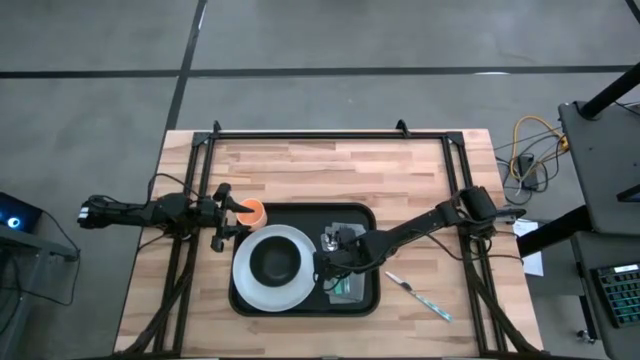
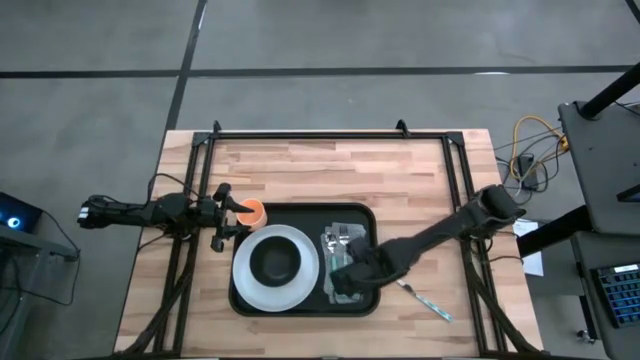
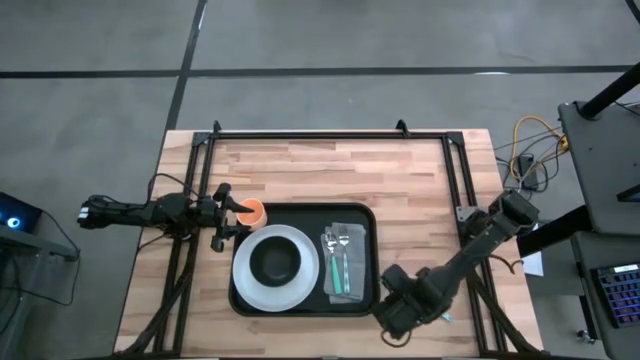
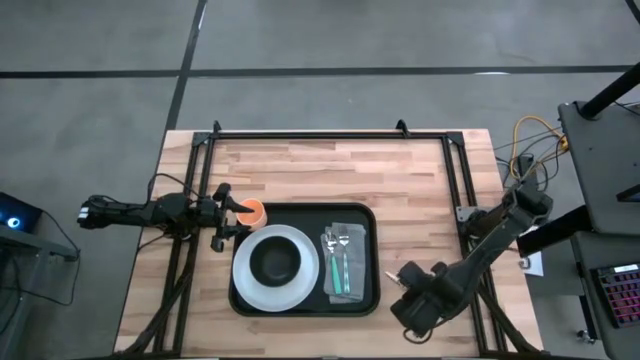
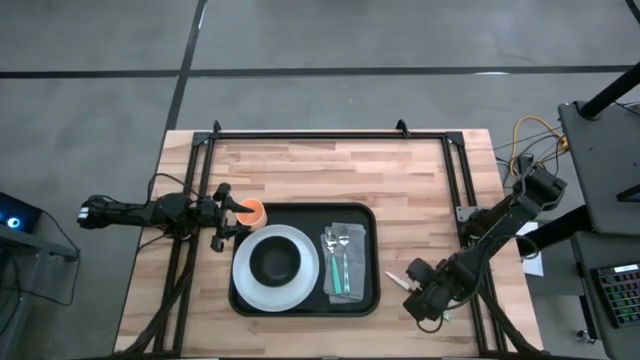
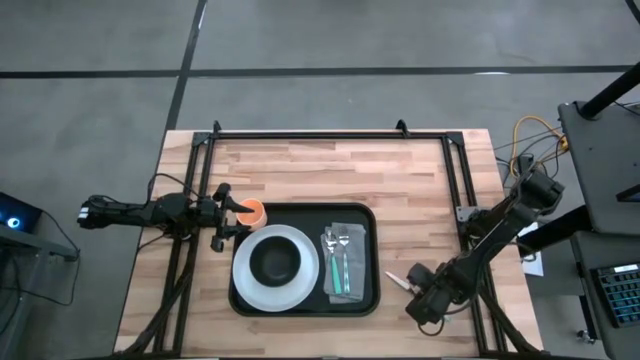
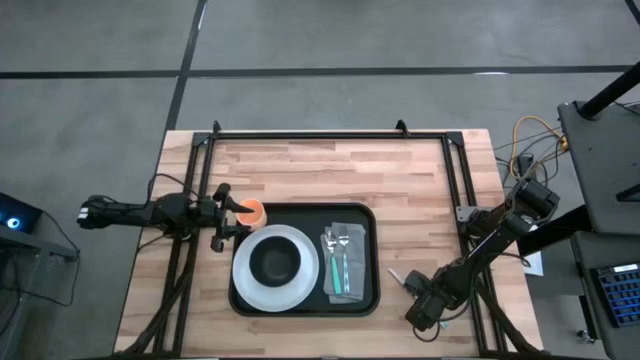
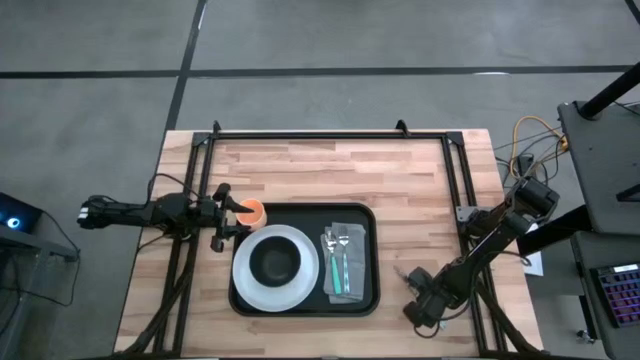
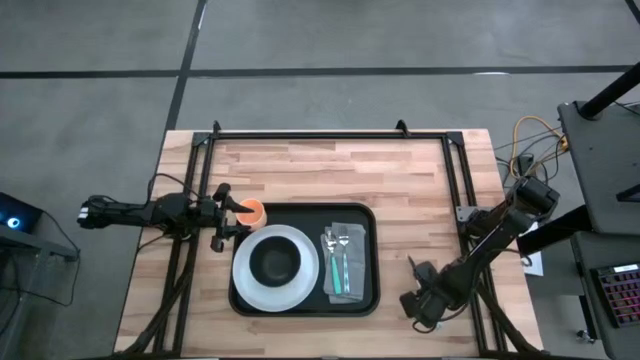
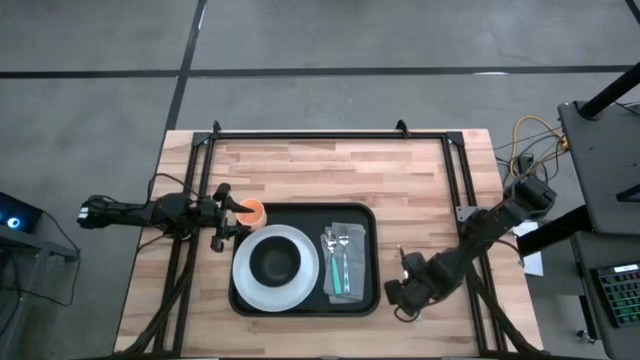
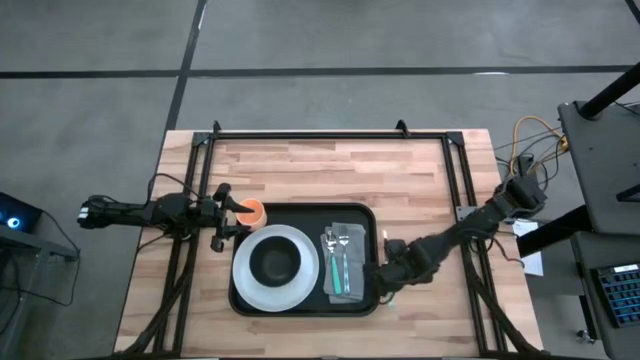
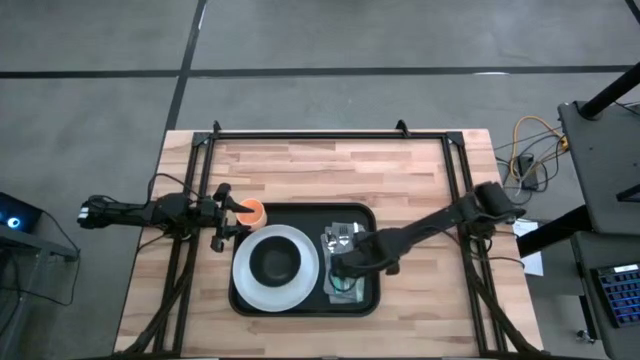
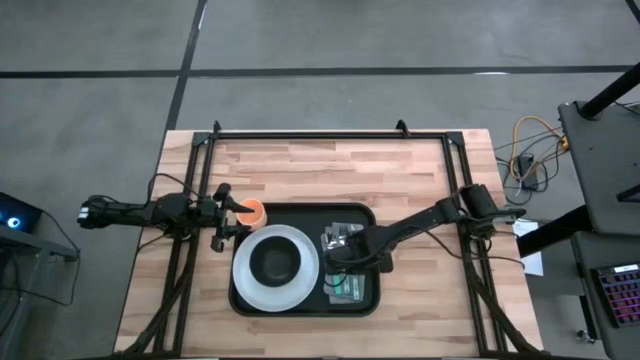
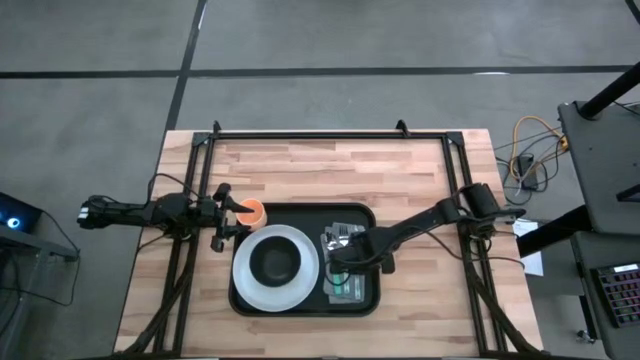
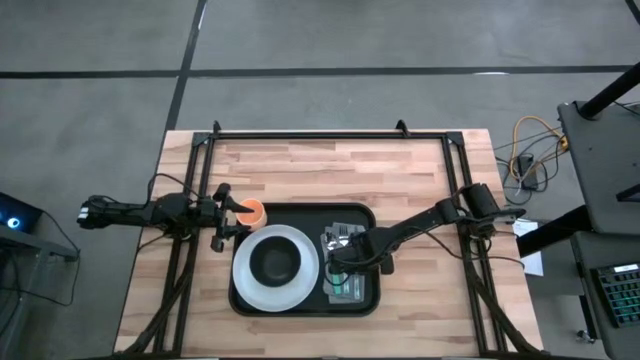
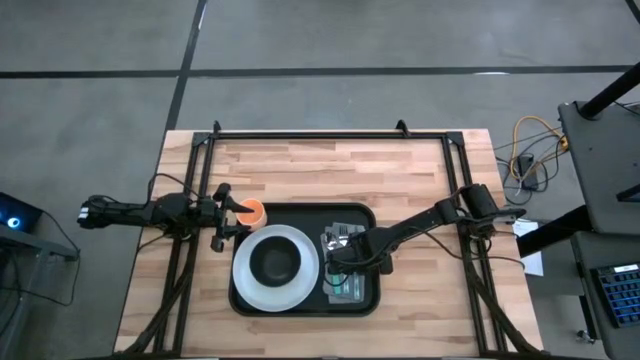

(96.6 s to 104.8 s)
Task: Set up tray
Put the table knife on the table napkin

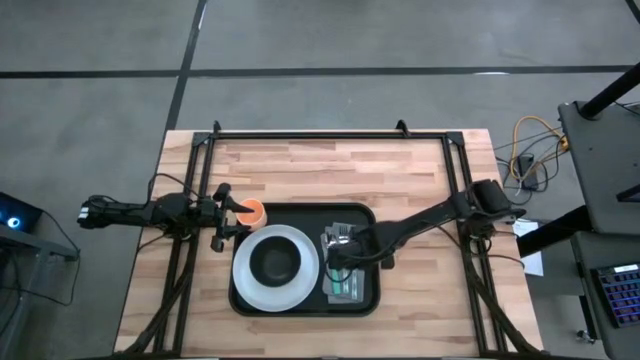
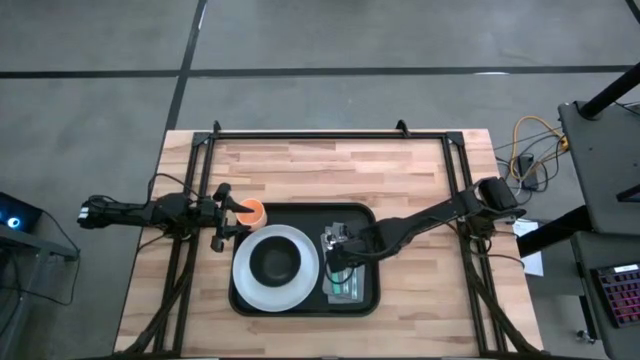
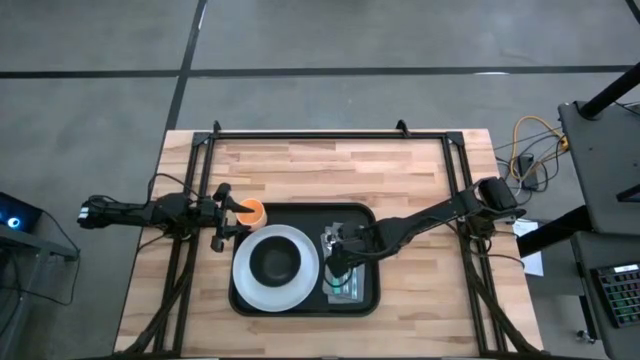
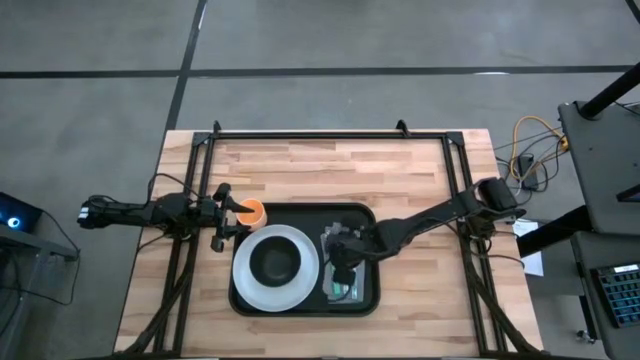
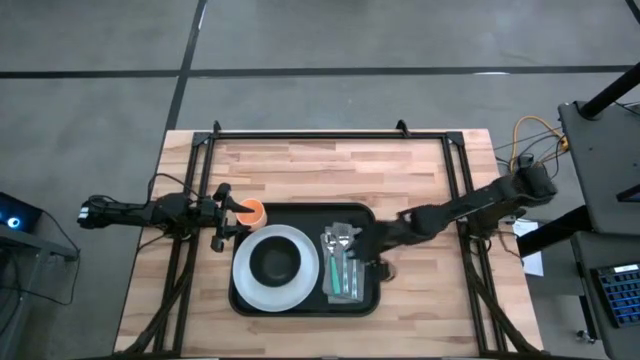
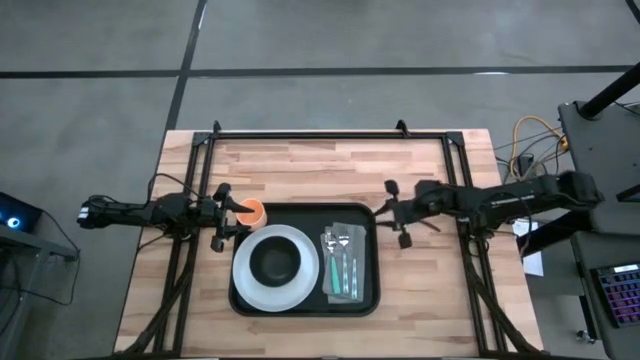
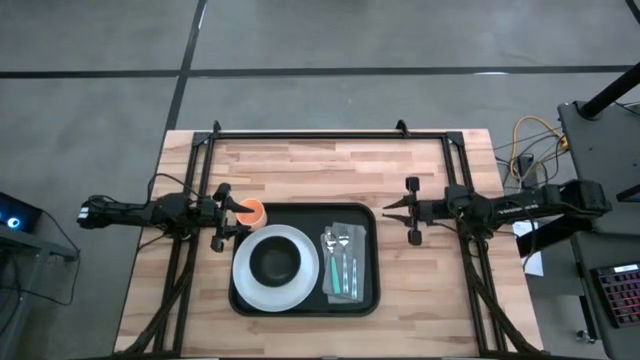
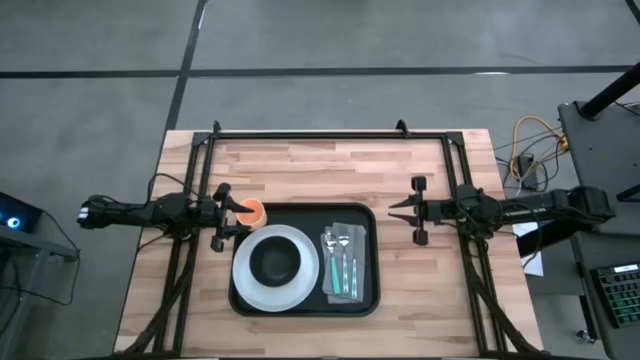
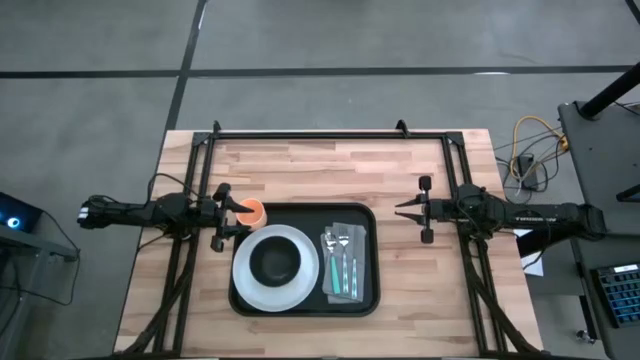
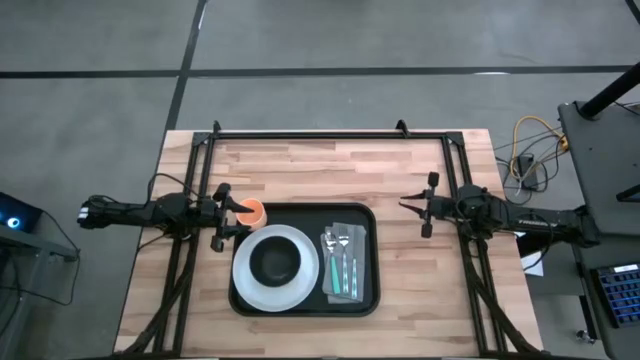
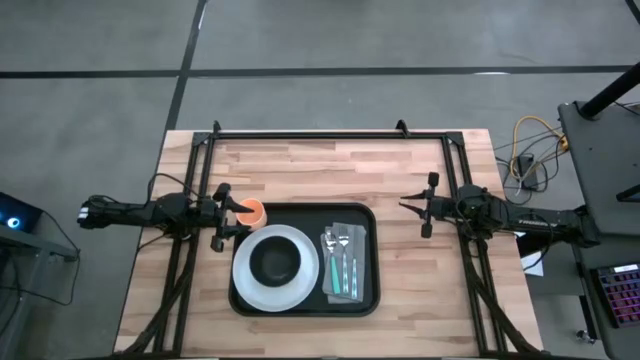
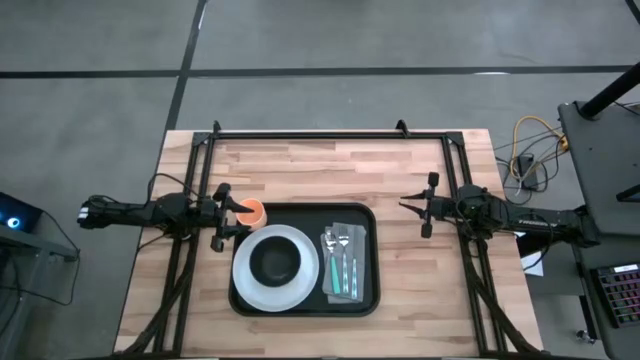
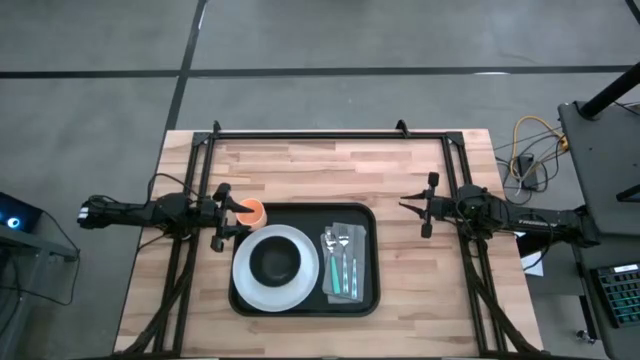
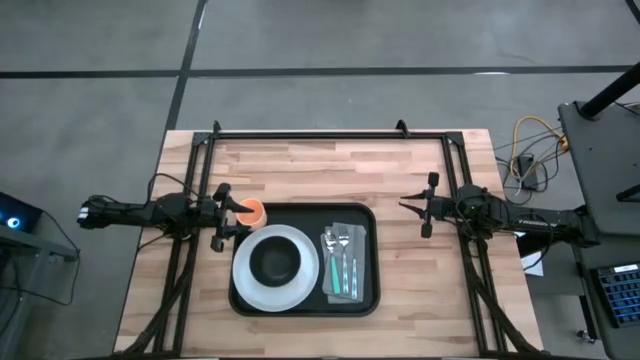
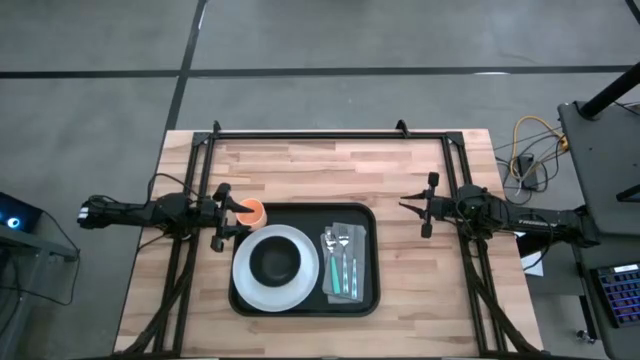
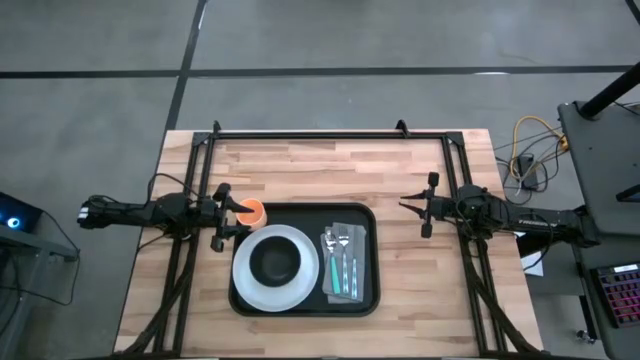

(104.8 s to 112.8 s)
Return to Home Position

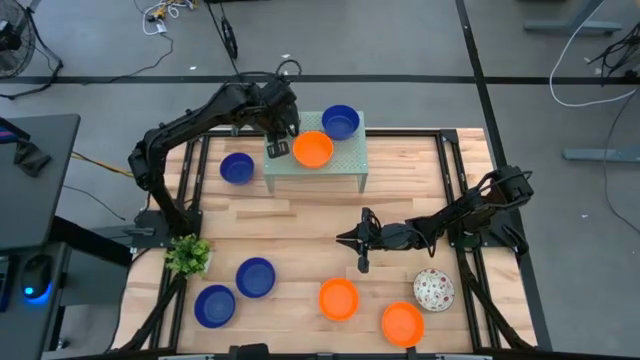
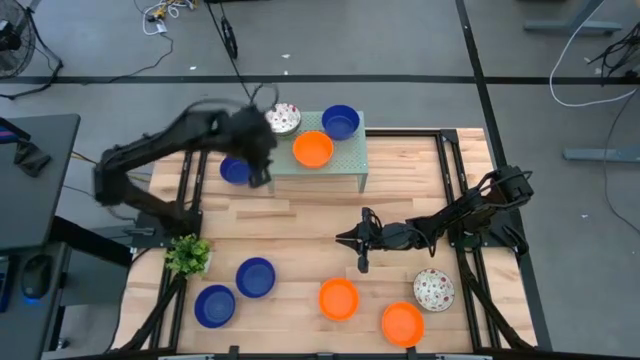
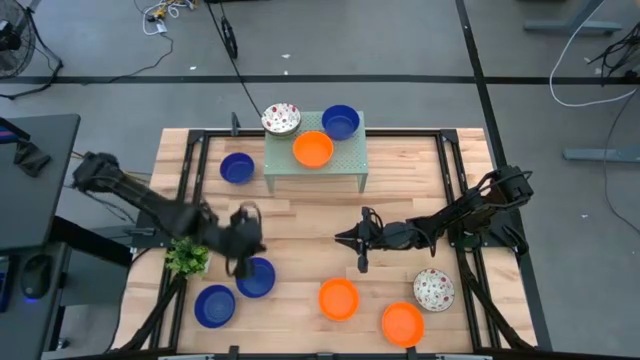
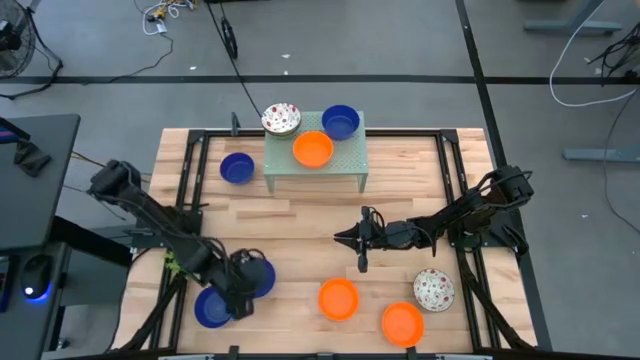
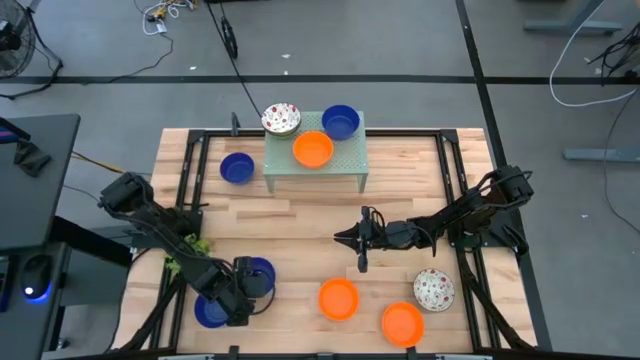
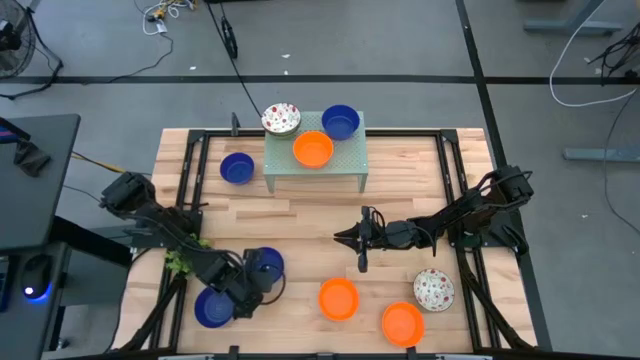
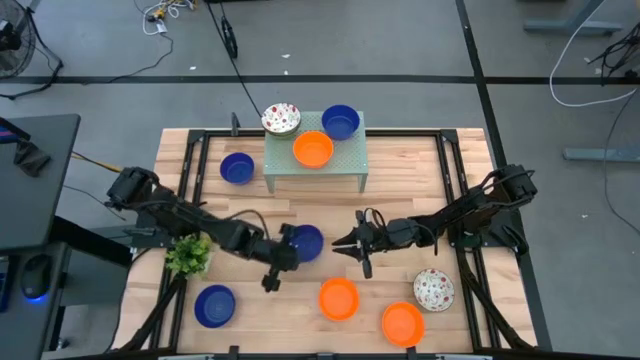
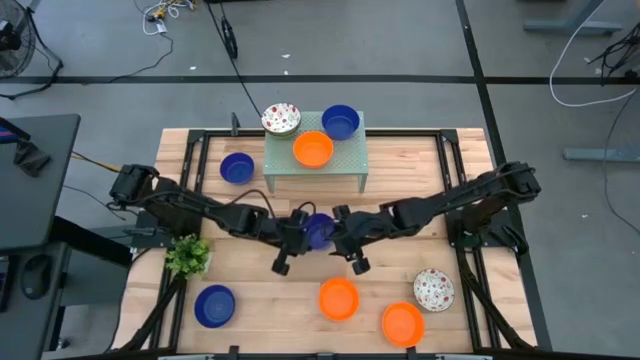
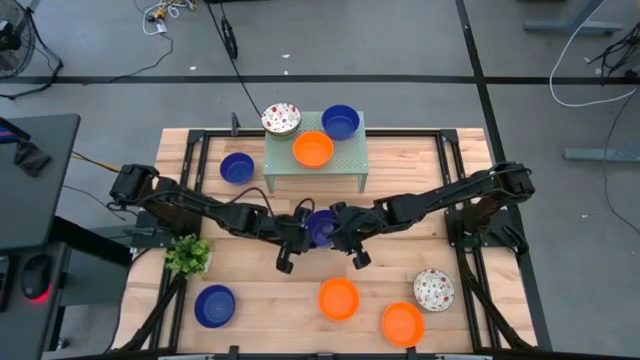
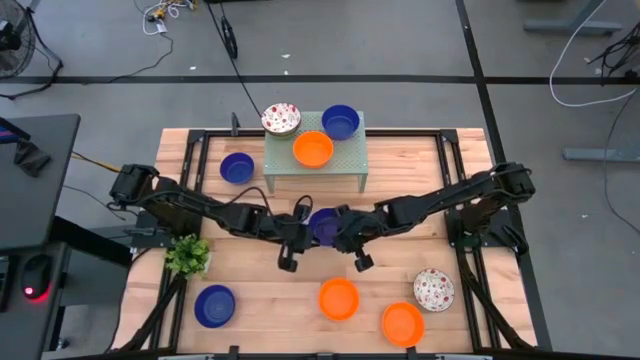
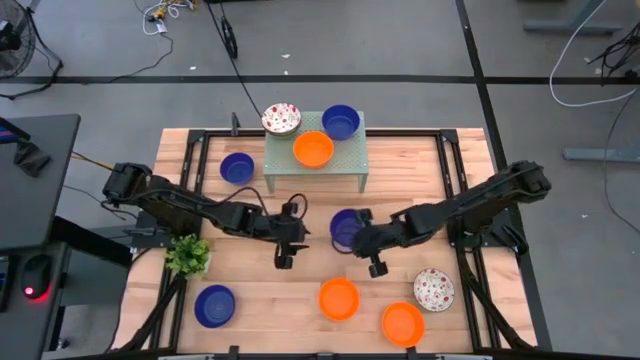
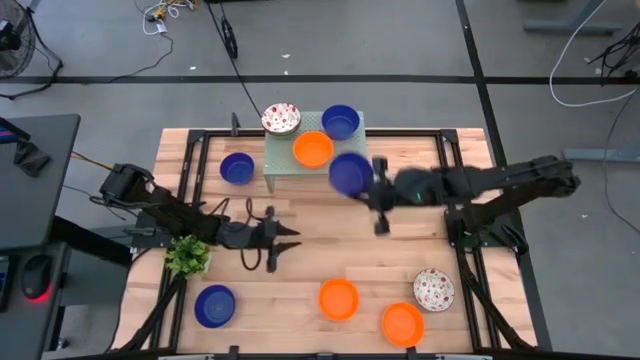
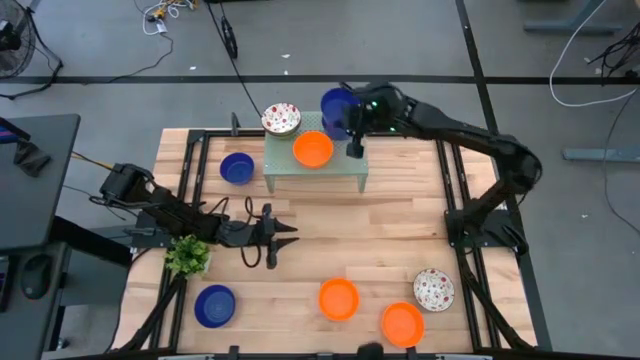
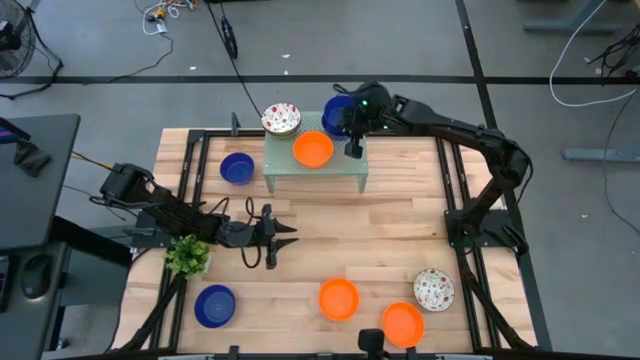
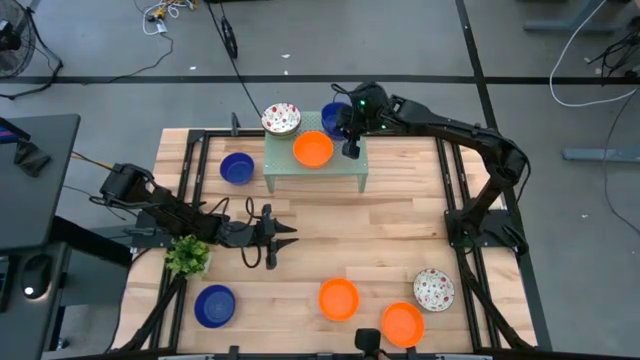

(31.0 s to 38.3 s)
Task: Pick & Place Mini bowls
Stack the blue bowl on the blue bowl on the shelf
